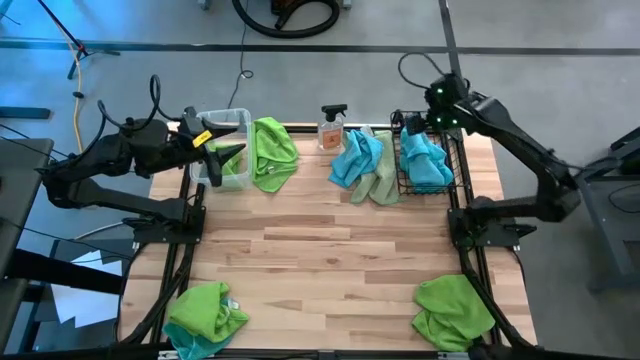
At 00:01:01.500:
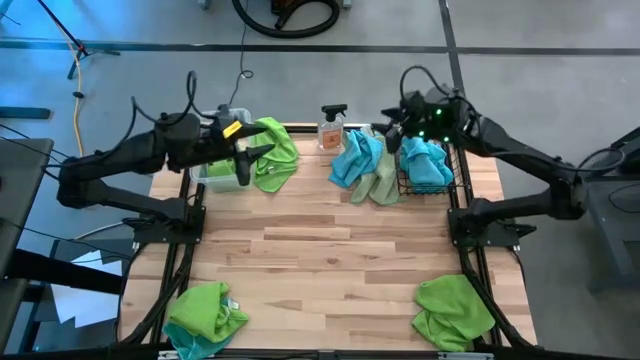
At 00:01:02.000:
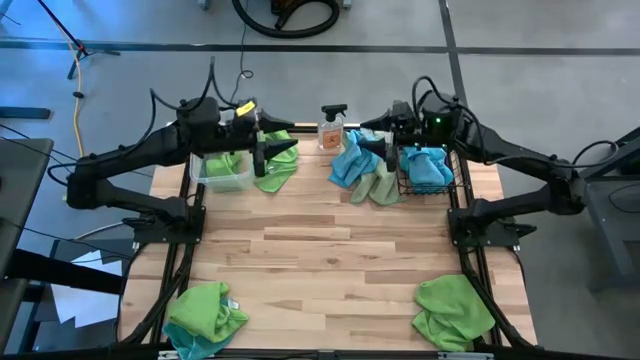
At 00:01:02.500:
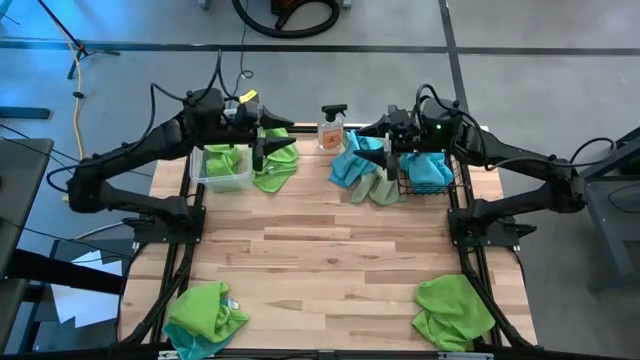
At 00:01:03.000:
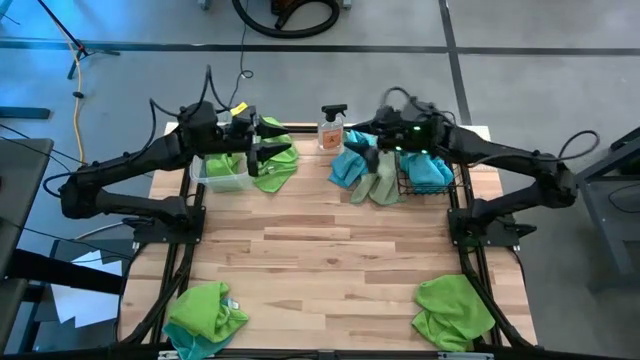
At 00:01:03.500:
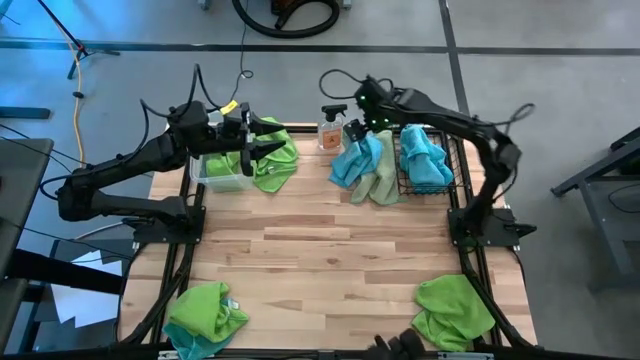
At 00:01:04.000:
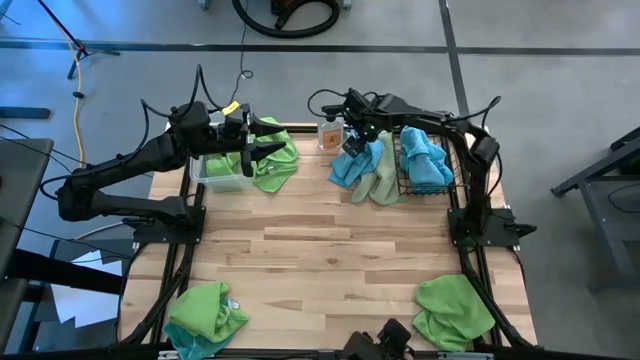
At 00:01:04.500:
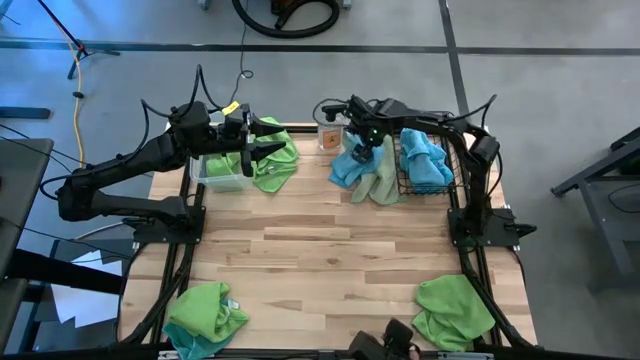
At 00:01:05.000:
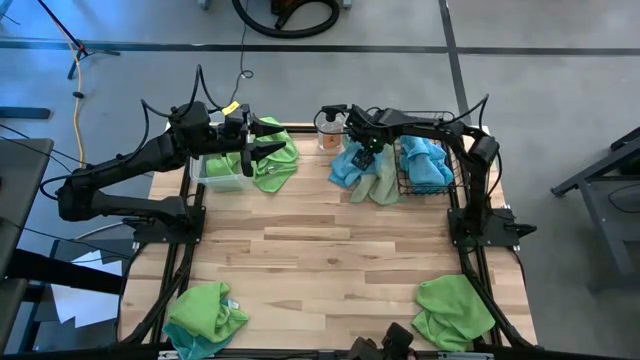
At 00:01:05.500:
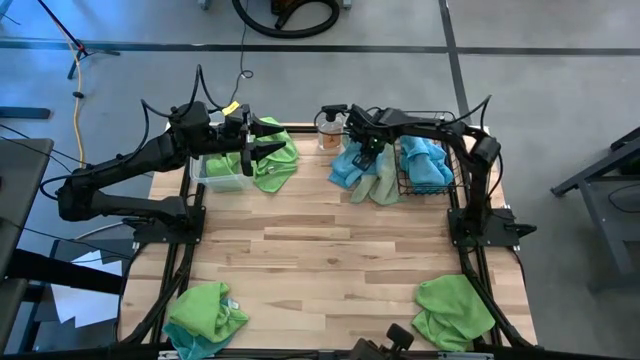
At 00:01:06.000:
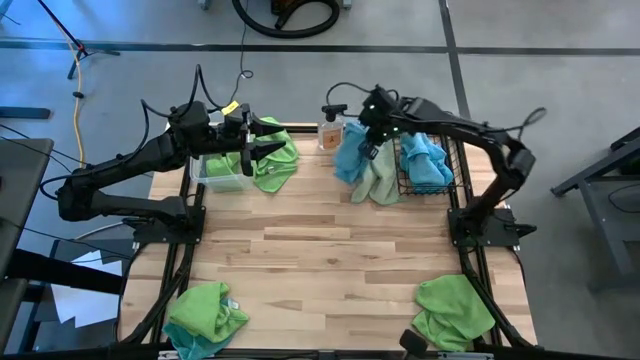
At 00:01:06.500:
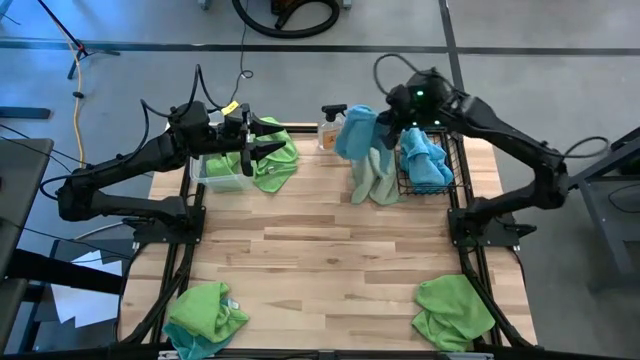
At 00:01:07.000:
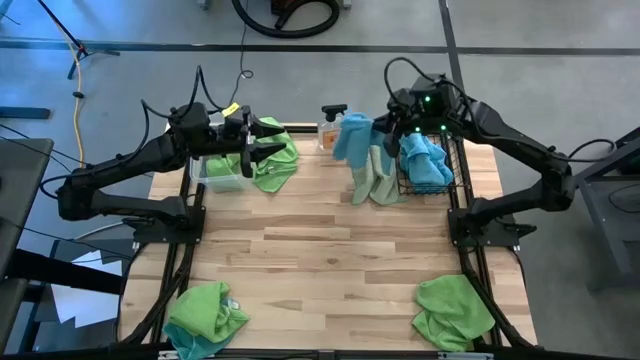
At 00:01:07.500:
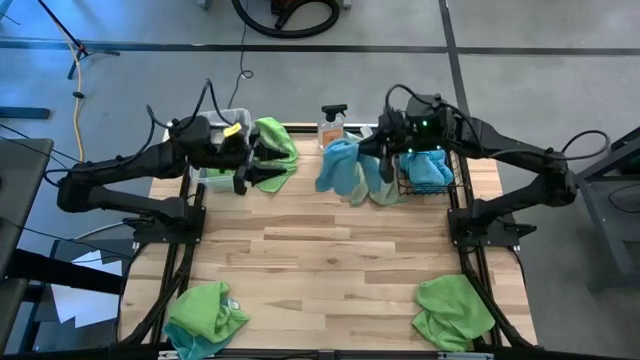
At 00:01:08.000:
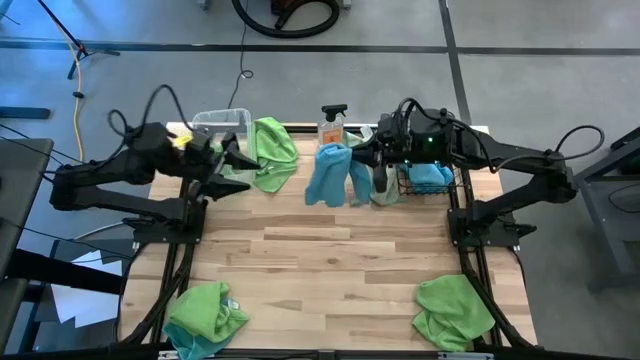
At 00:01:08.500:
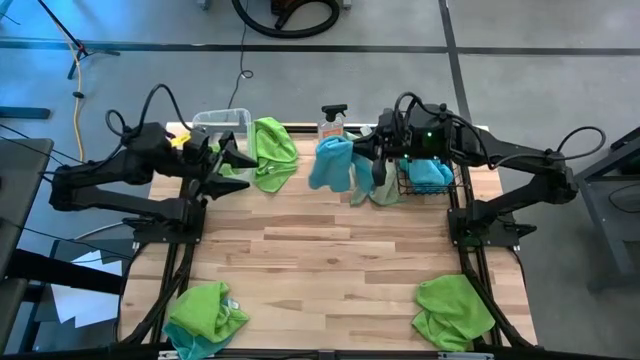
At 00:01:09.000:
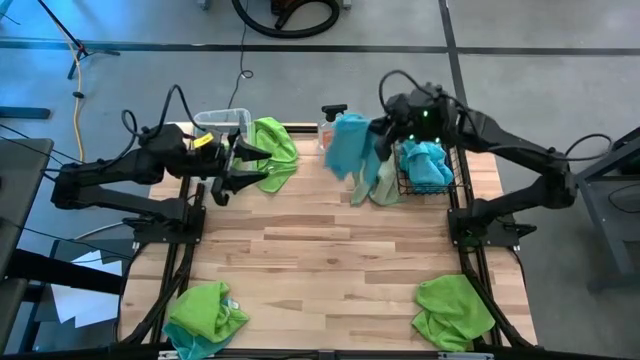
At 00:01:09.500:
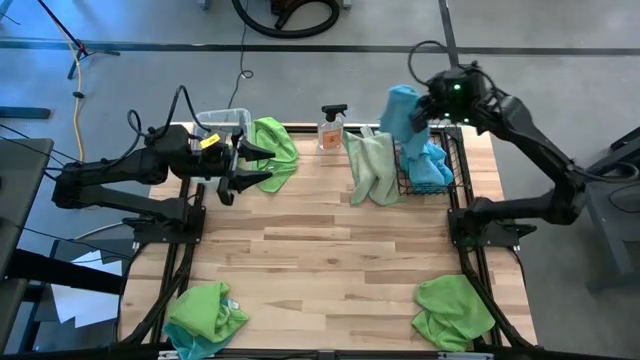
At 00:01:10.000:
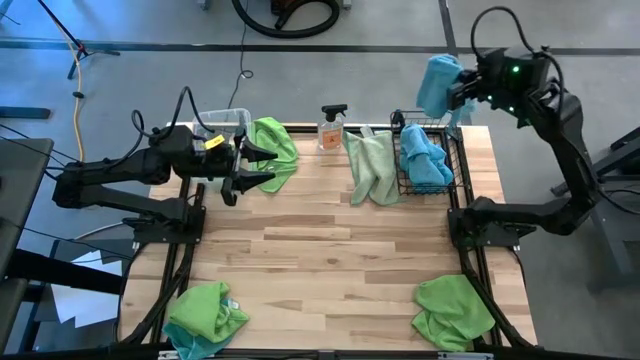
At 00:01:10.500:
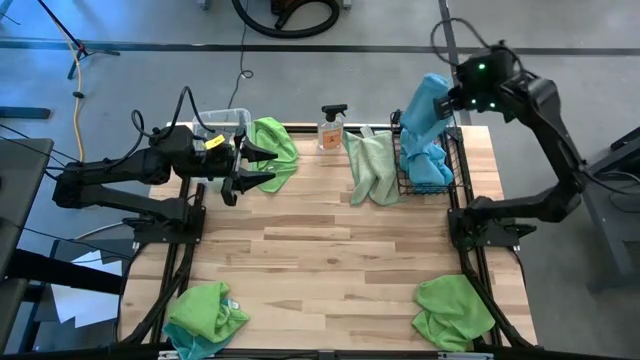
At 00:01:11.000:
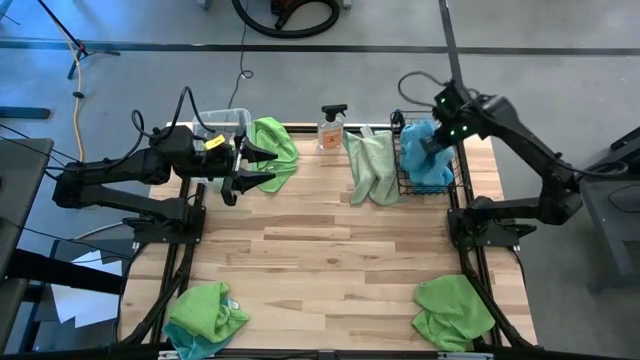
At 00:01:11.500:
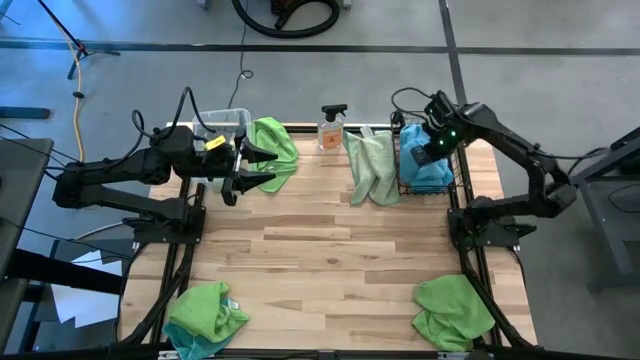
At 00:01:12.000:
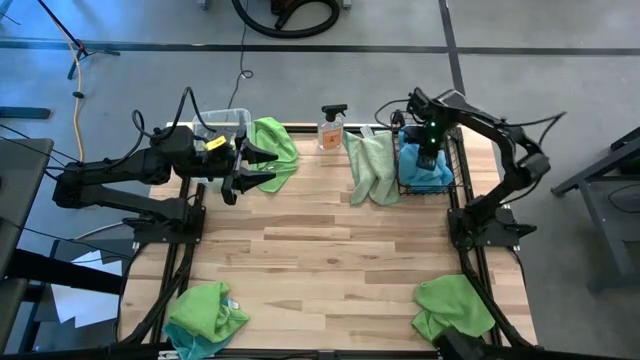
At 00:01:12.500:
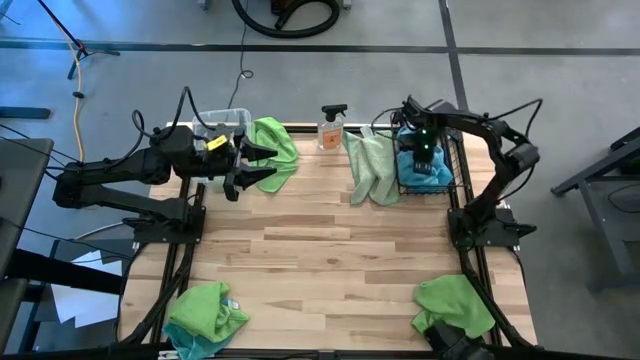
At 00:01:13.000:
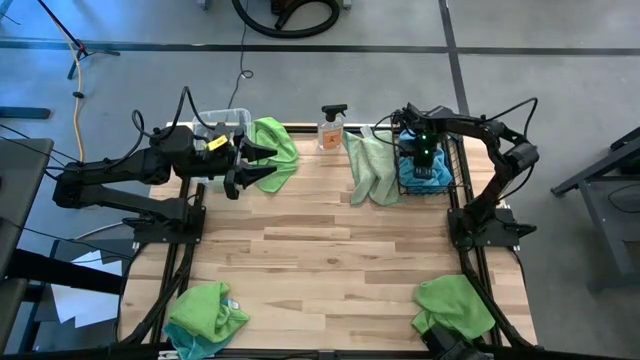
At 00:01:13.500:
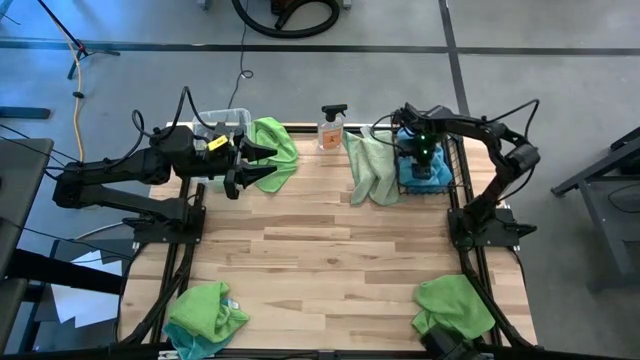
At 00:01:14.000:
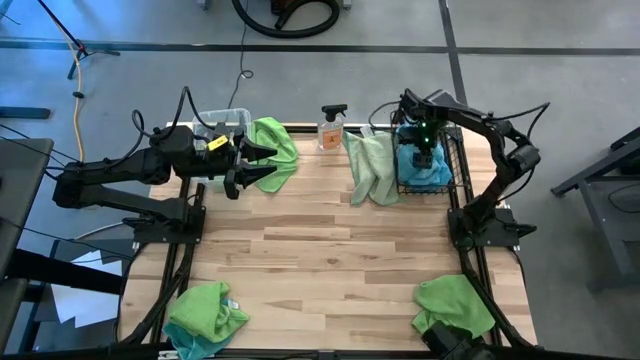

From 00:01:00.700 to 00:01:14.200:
Task: Sort microfiber towel by color & place in baskets
Put the blue microfiber cloth into the basket

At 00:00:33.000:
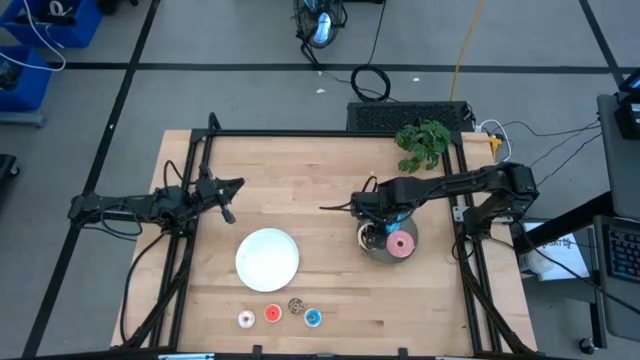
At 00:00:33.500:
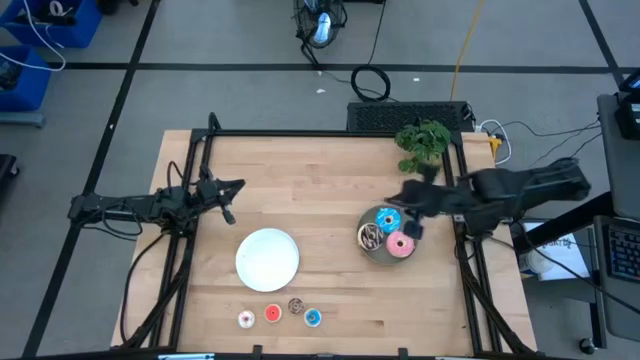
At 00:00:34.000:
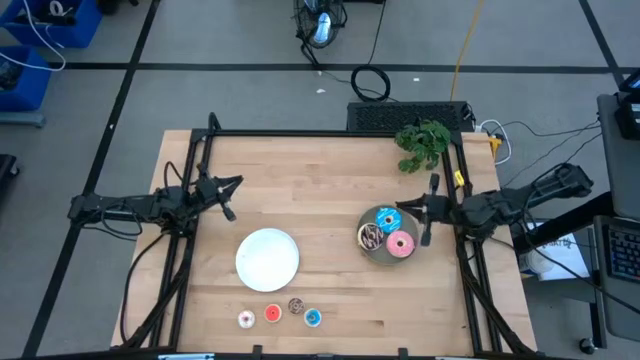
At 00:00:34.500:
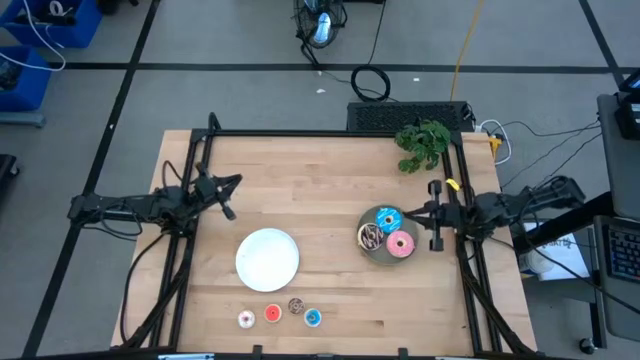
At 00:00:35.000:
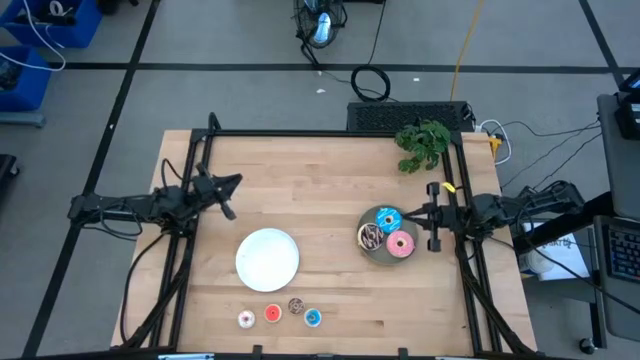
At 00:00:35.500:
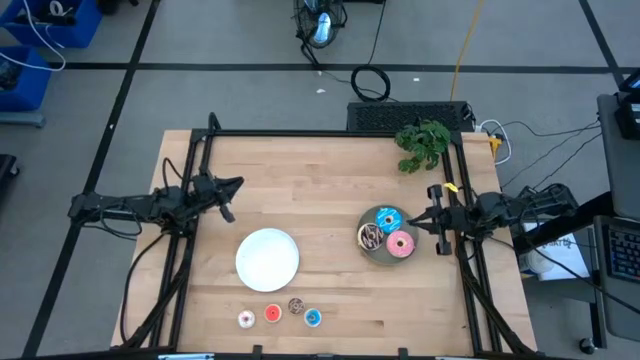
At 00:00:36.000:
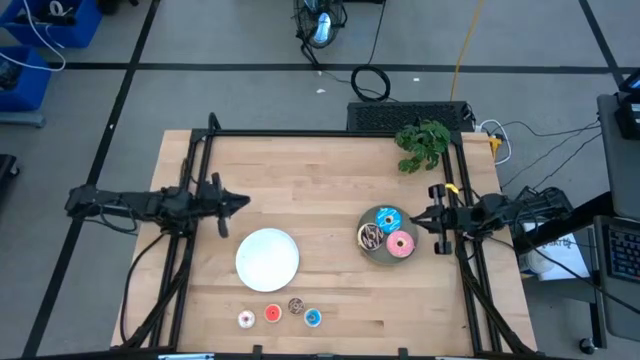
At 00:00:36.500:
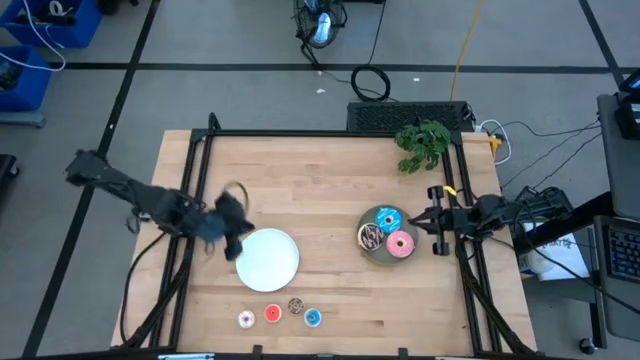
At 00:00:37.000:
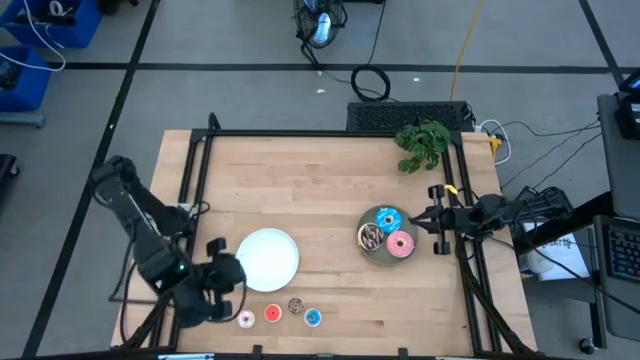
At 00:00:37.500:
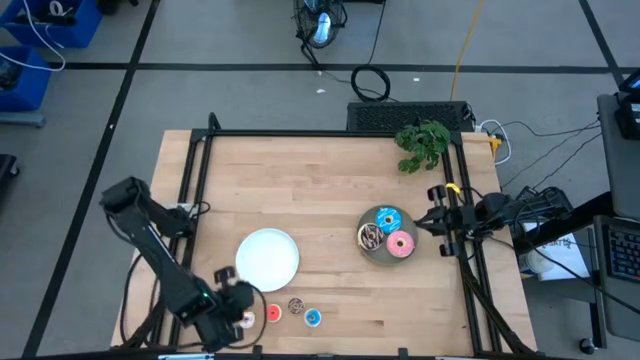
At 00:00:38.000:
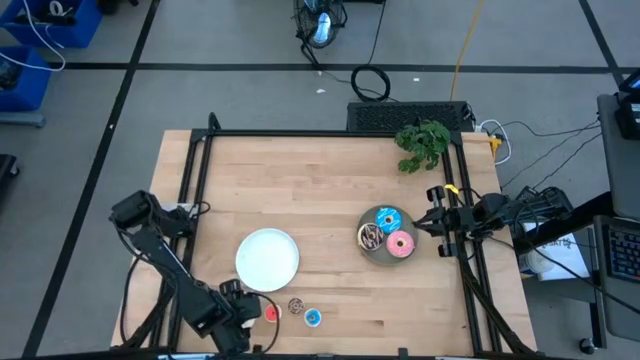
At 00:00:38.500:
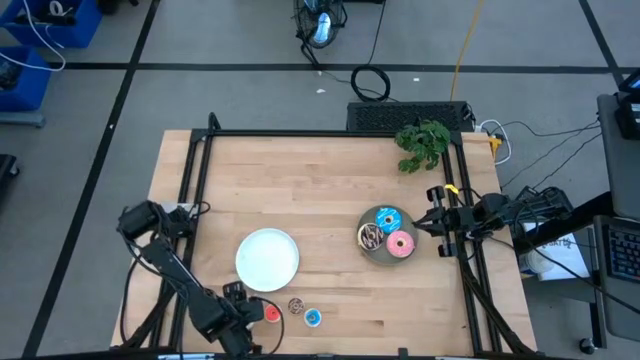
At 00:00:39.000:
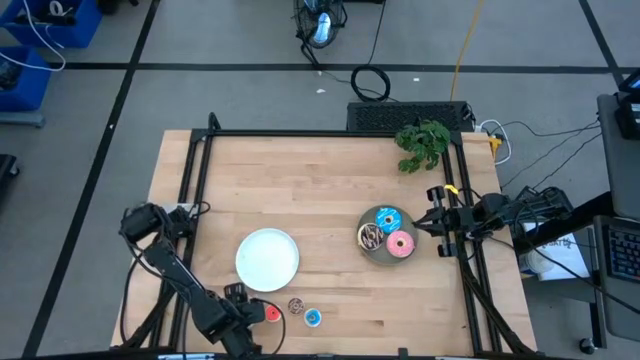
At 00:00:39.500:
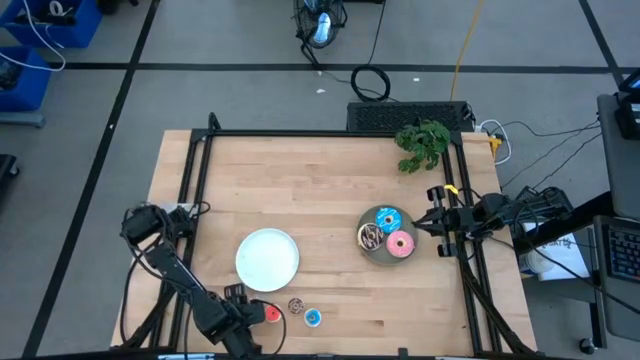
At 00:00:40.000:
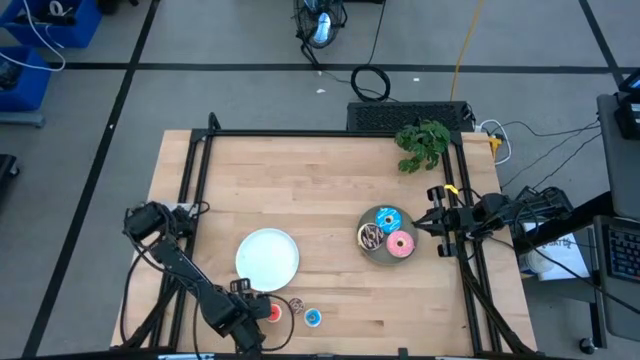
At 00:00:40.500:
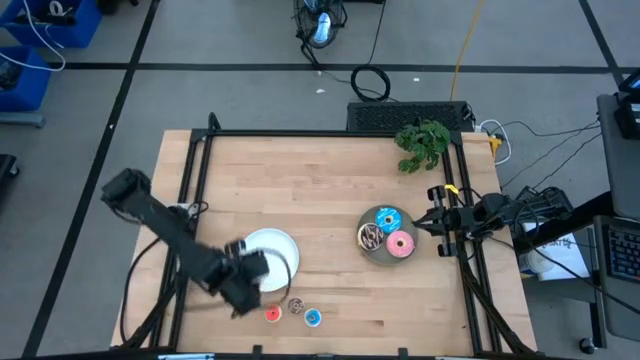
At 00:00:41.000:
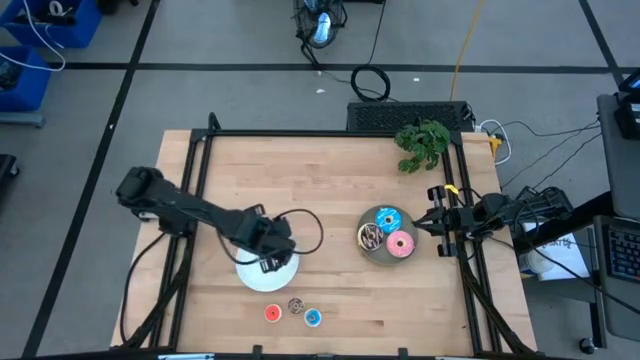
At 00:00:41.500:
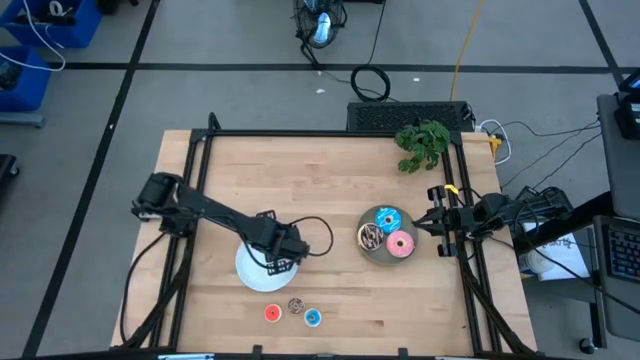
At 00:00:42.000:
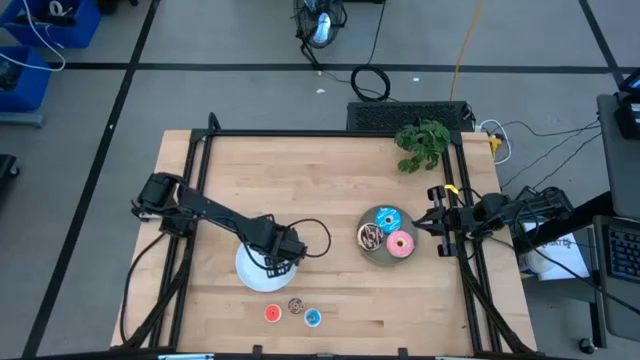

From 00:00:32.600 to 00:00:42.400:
Task: Pick & Place donuts
Put the small white donut on the white plate
